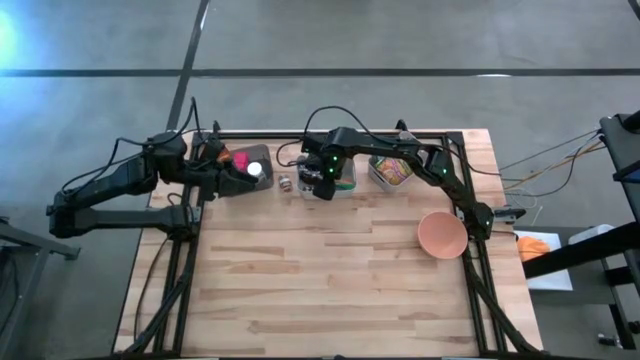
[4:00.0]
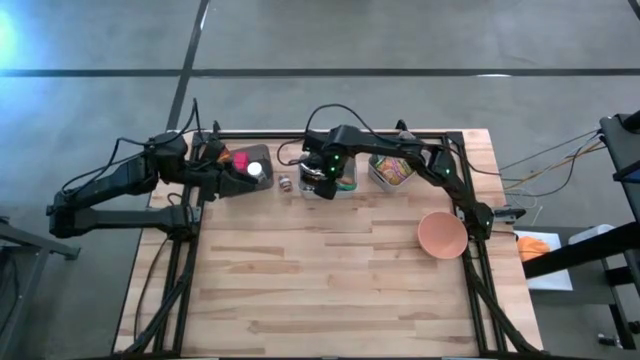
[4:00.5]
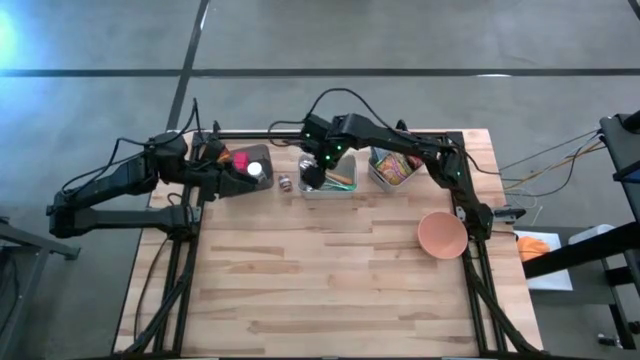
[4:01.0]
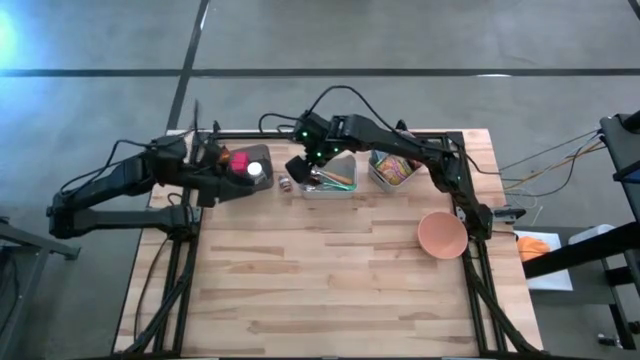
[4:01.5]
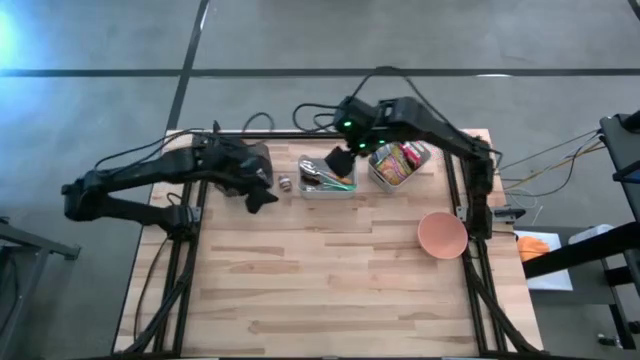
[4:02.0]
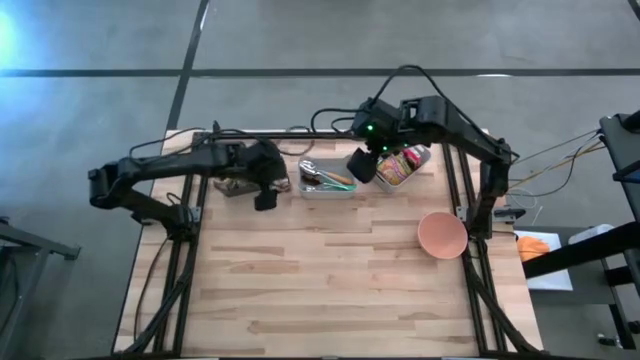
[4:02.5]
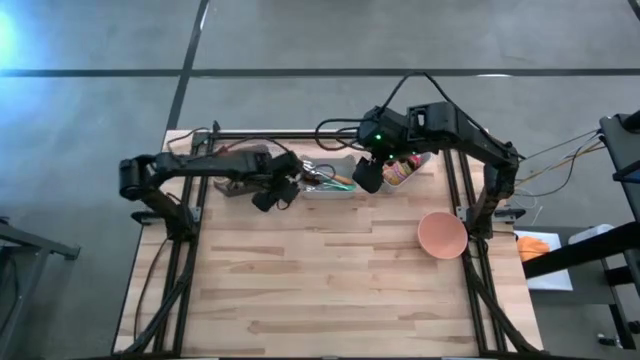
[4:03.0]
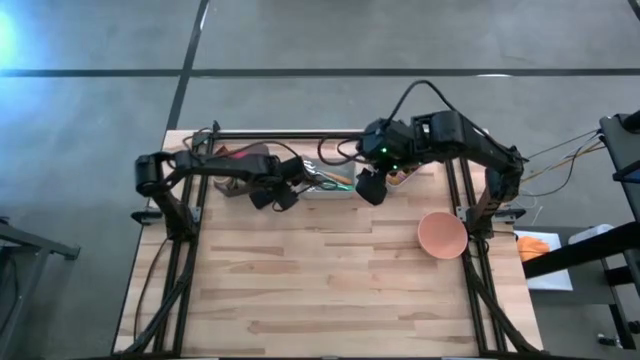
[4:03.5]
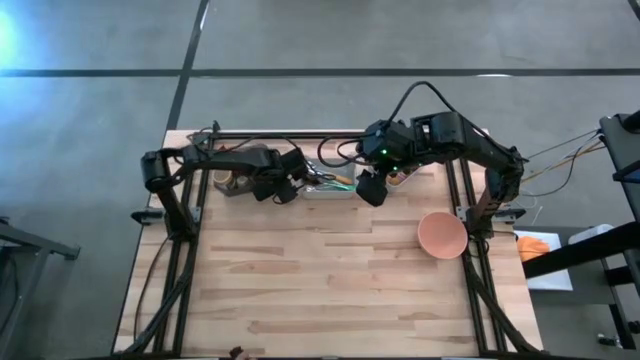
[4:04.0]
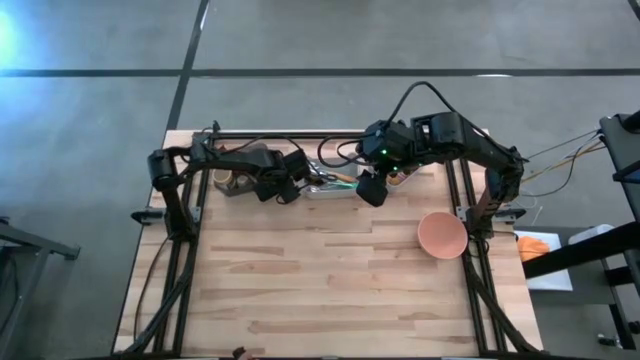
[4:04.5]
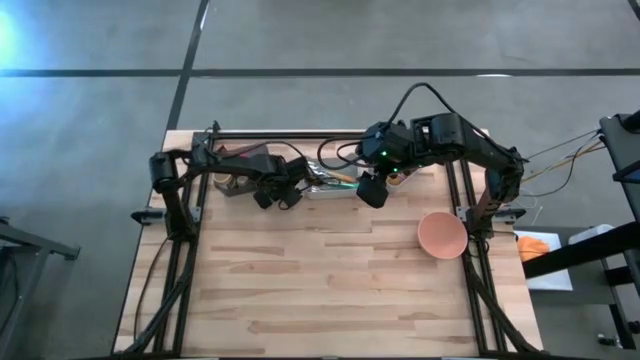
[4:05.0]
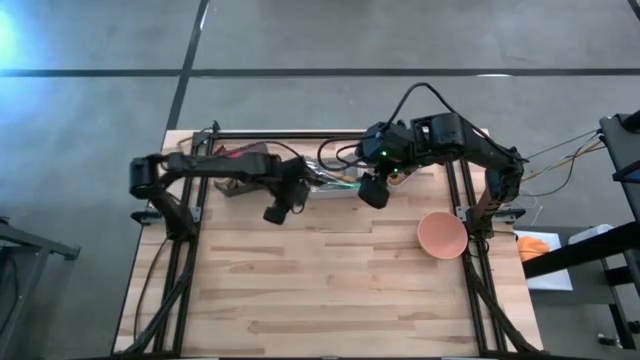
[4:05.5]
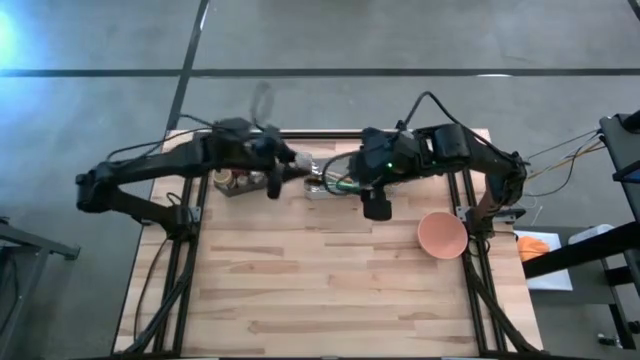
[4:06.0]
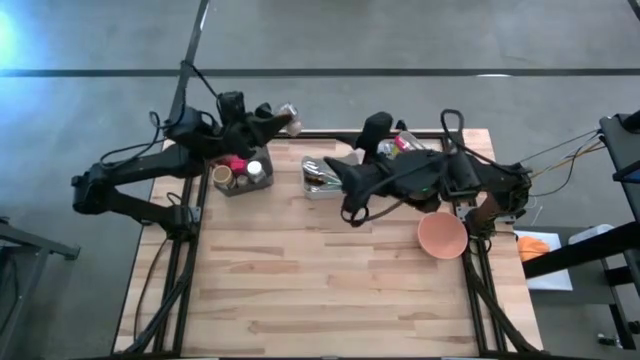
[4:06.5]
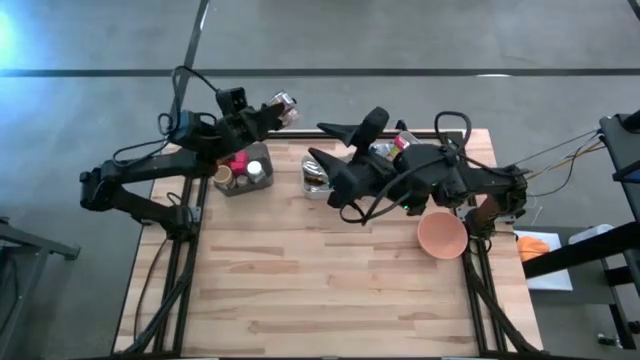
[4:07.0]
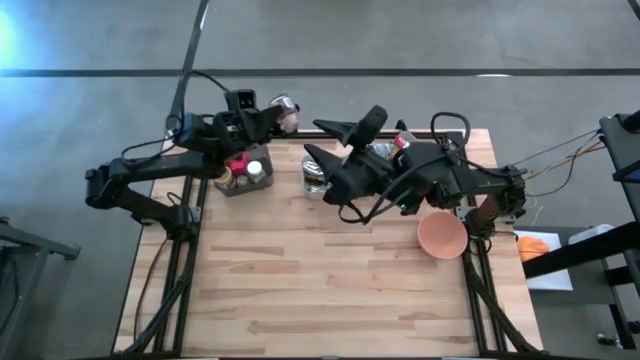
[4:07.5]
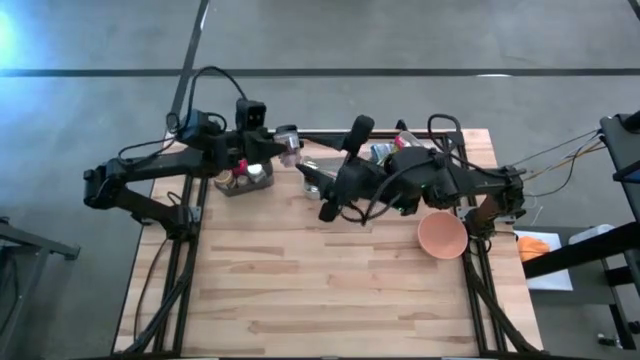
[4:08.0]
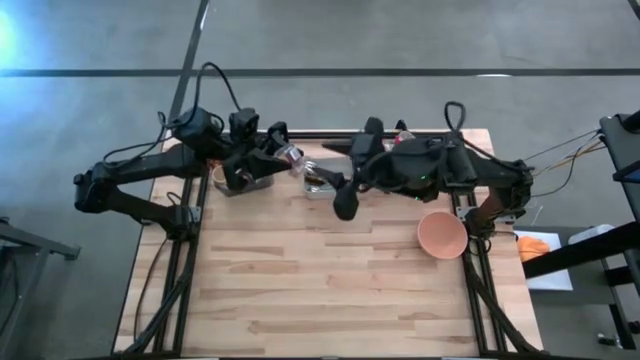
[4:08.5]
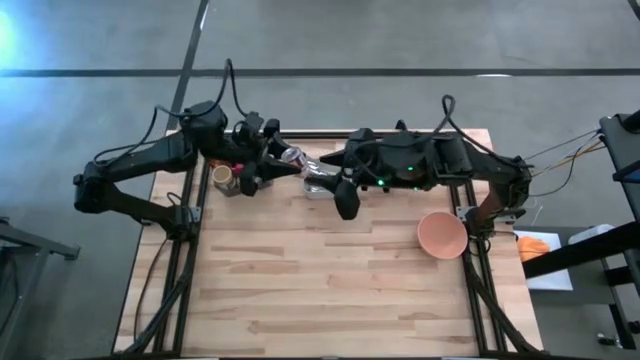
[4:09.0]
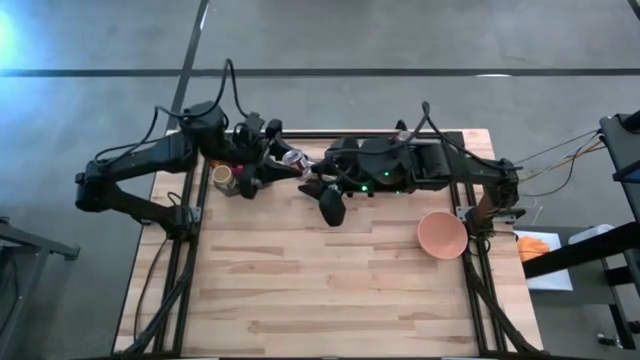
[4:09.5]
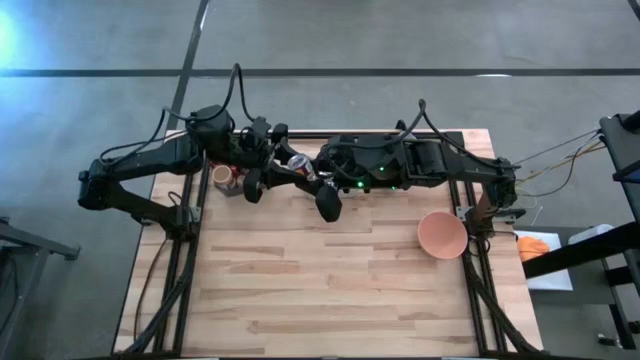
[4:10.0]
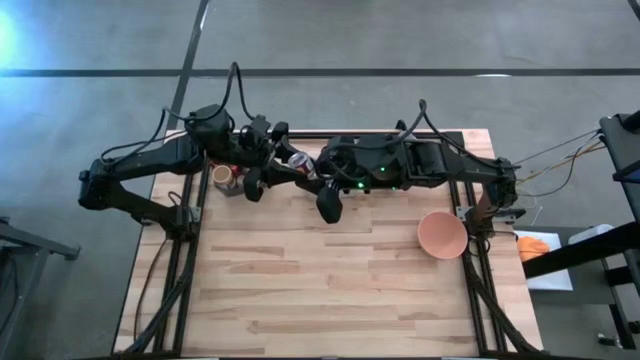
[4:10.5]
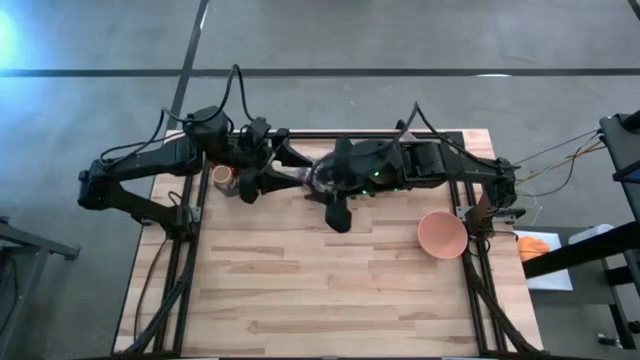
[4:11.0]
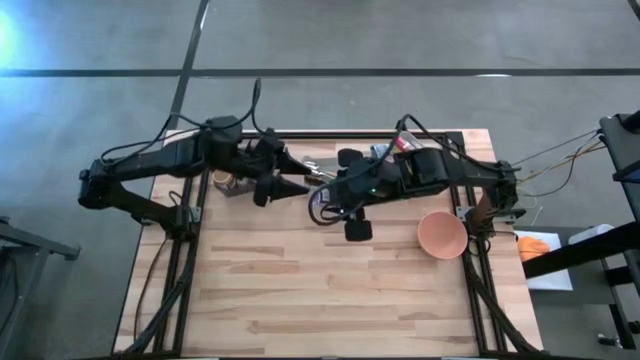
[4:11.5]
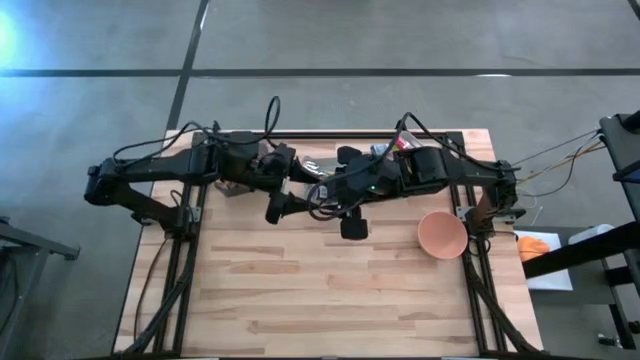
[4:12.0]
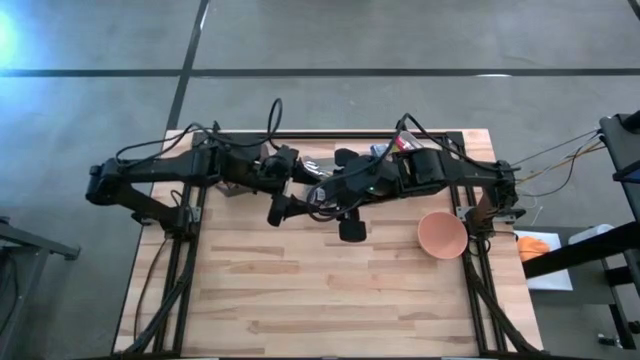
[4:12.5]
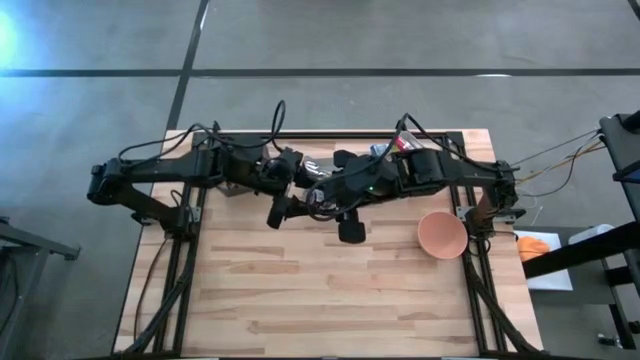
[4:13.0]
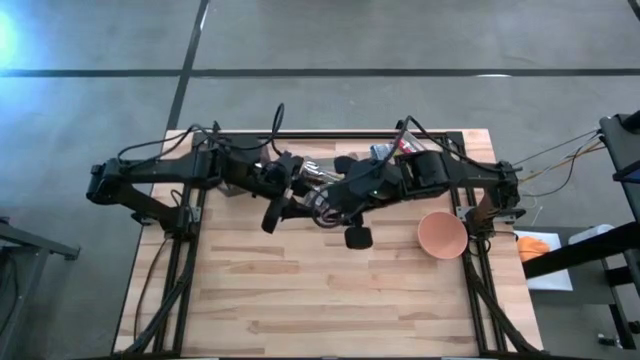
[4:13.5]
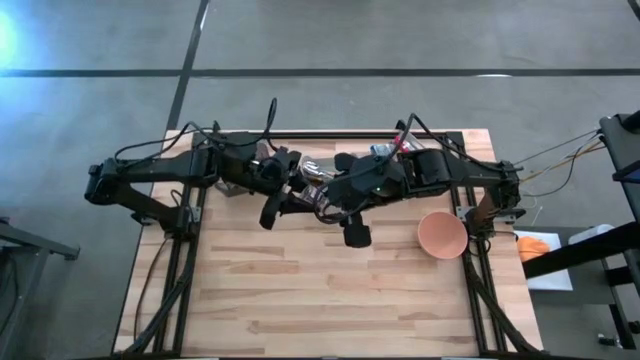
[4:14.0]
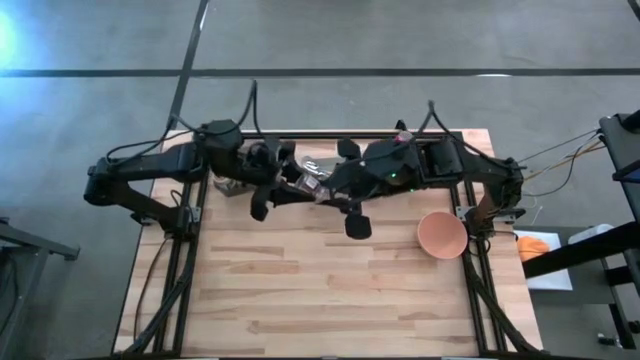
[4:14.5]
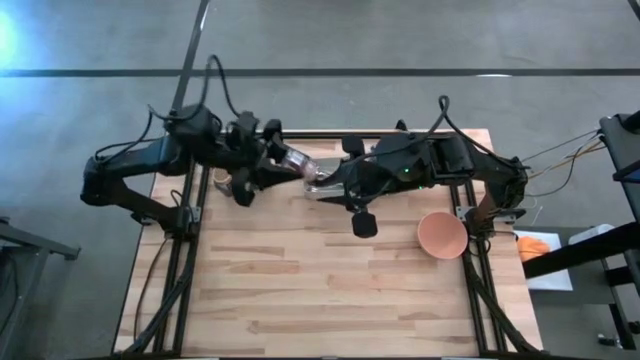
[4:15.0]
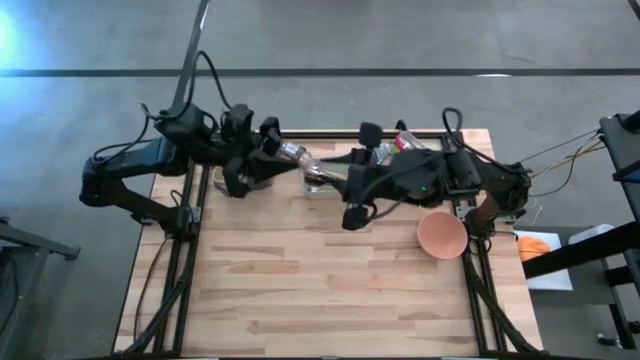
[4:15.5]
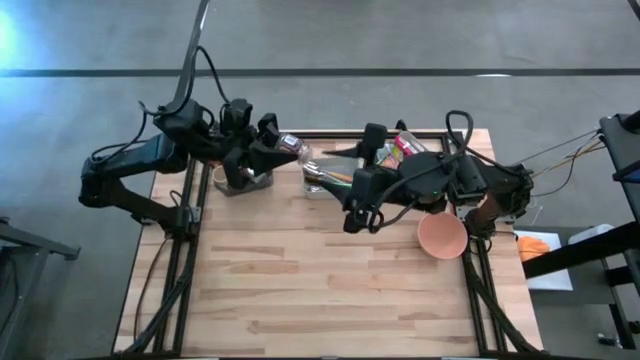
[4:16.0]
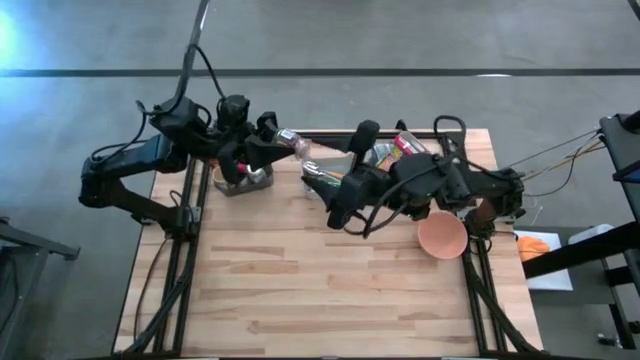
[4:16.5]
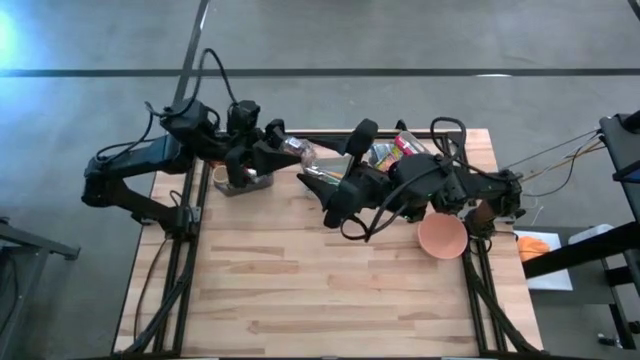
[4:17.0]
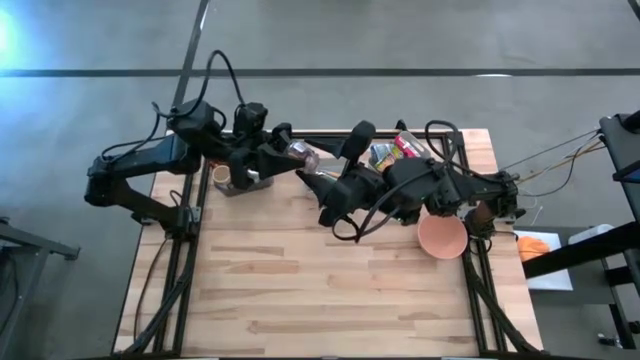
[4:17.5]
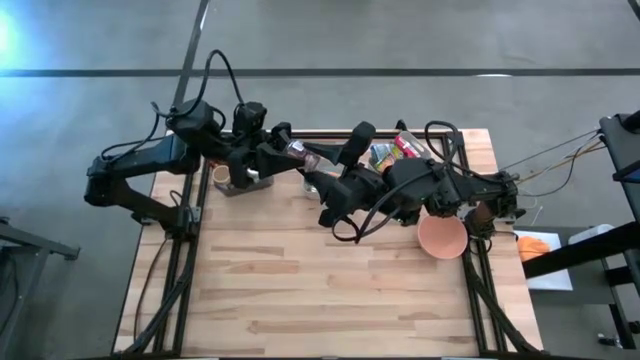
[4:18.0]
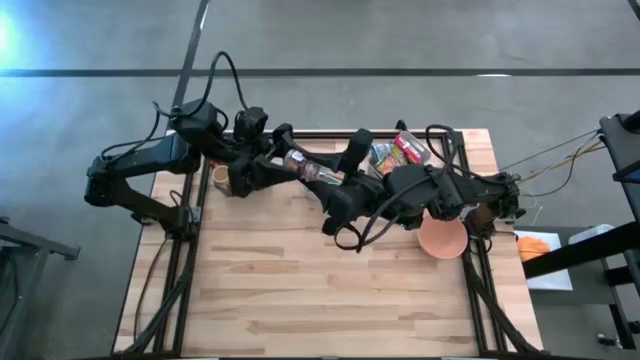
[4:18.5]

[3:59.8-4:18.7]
Put the brown seasoning bottle into the black bin
